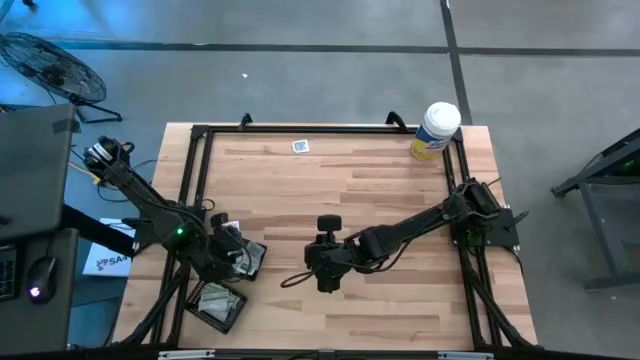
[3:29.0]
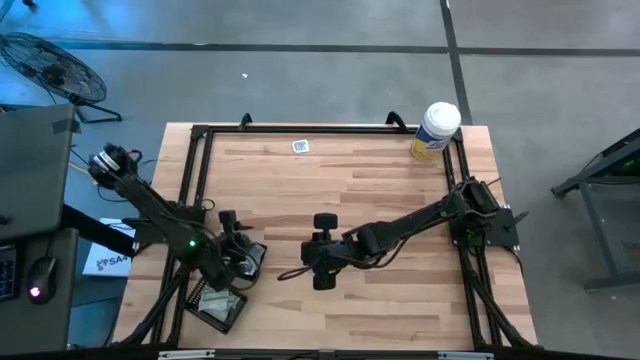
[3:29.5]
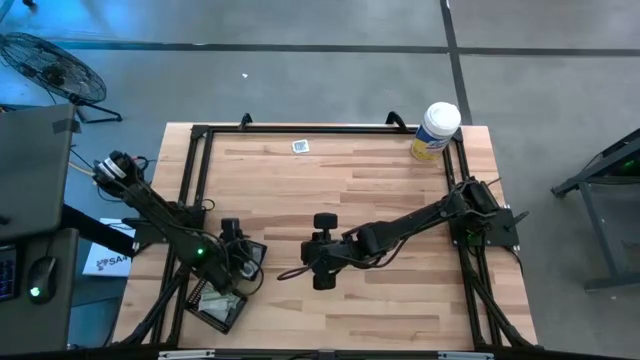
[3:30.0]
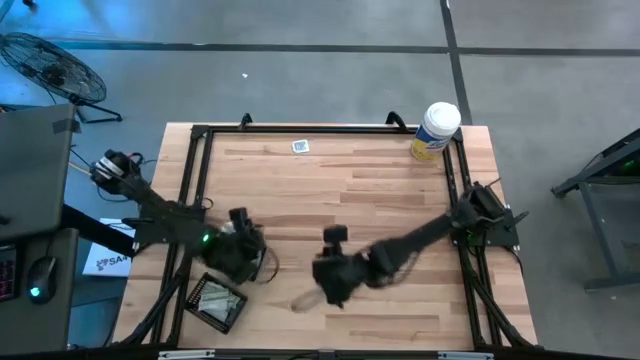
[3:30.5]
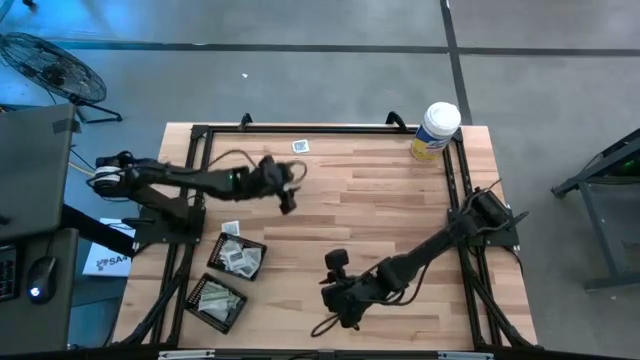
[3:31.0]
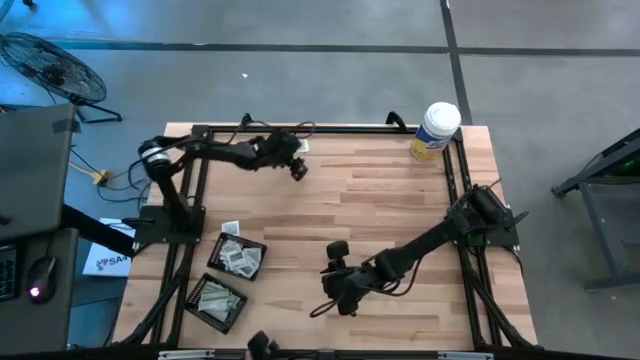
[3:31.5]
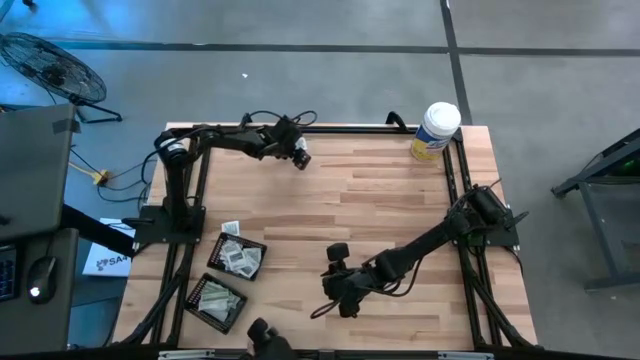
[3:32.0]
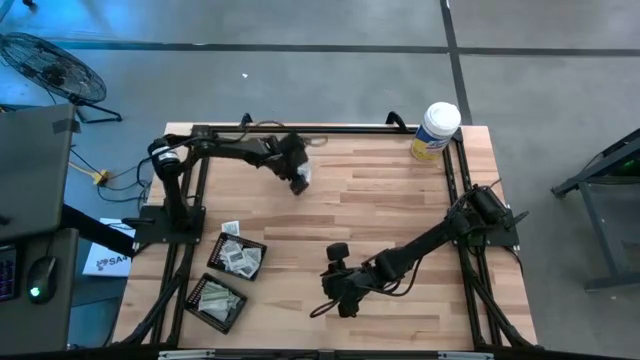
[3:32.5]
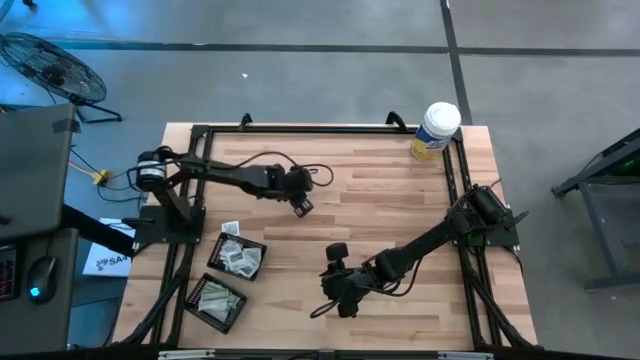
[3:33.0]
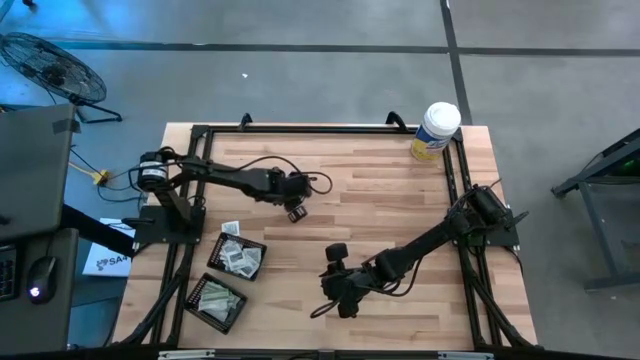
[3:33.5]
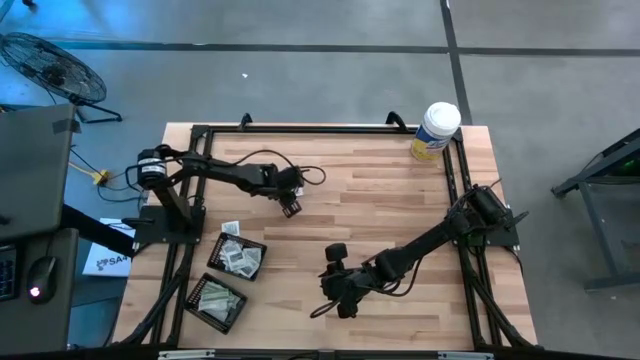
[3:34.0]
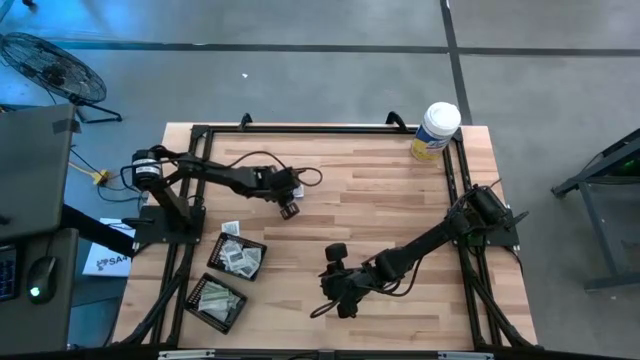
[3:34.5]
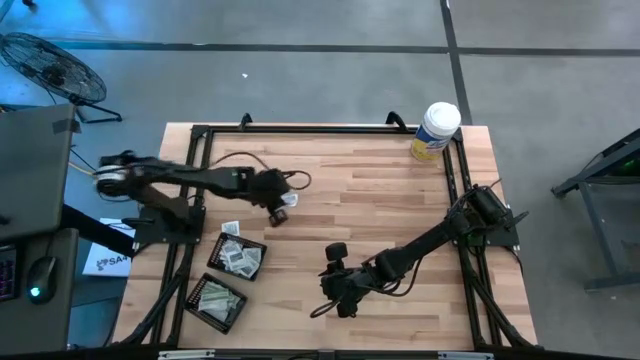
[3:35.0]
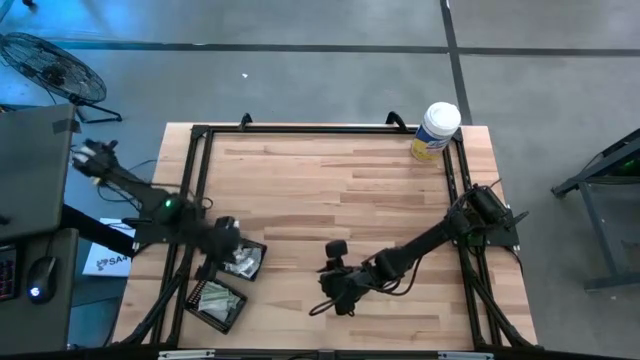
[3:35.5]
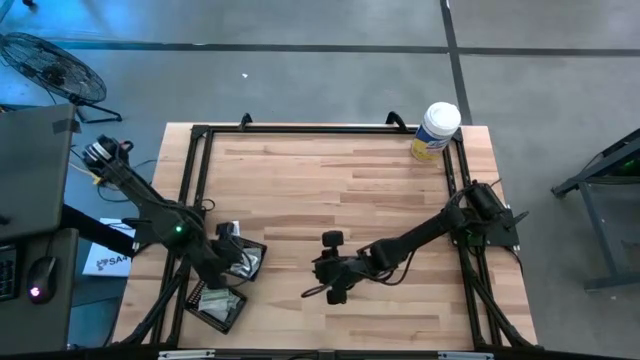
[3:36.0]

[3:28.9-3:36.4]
Task: Pick & Place First Aid Supplies
Put the towelette pack into the top black bin

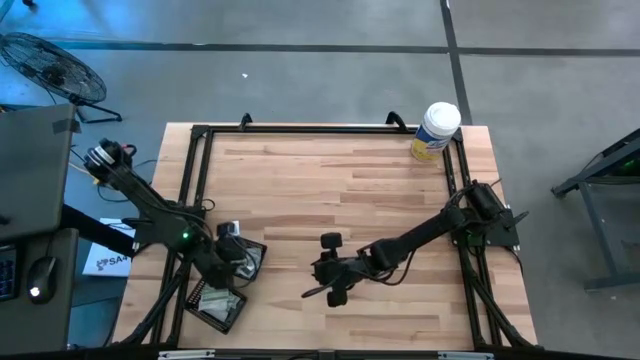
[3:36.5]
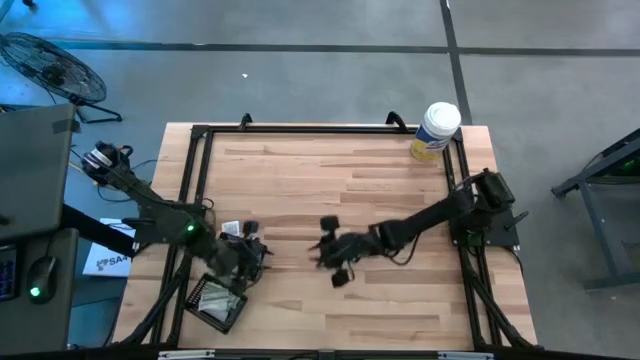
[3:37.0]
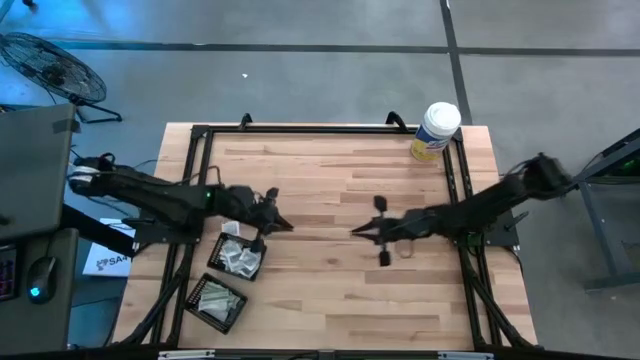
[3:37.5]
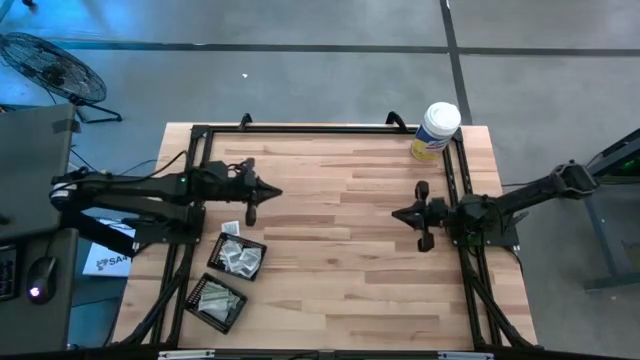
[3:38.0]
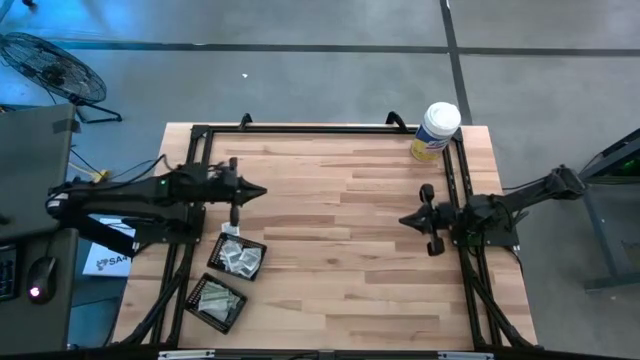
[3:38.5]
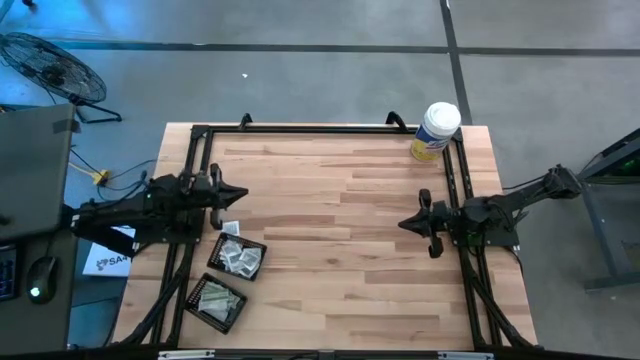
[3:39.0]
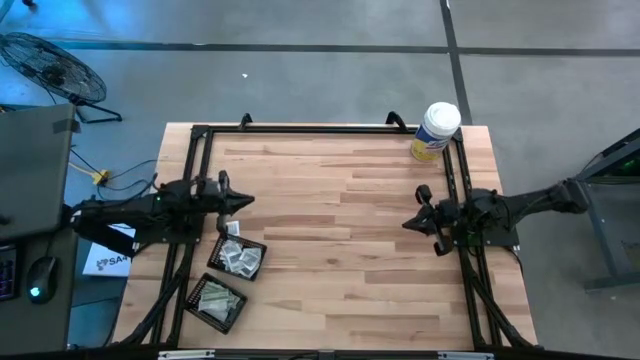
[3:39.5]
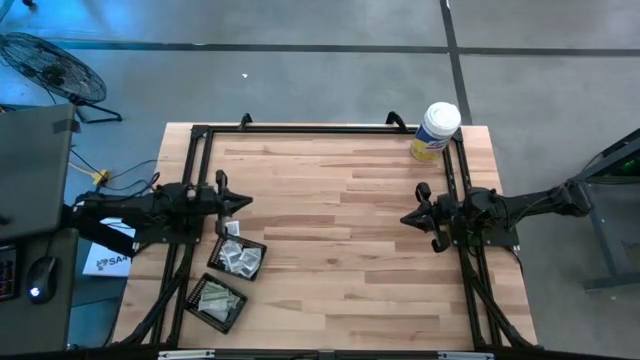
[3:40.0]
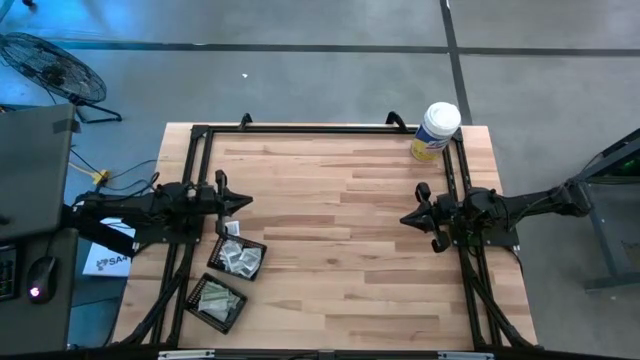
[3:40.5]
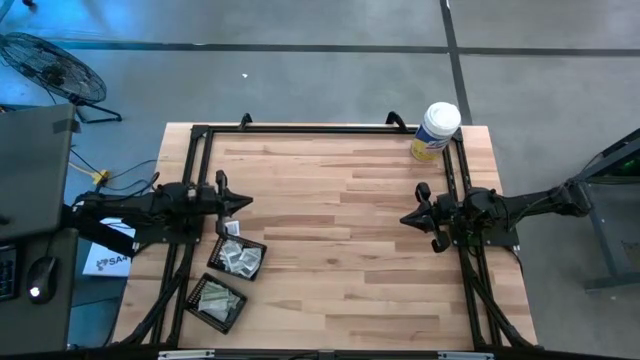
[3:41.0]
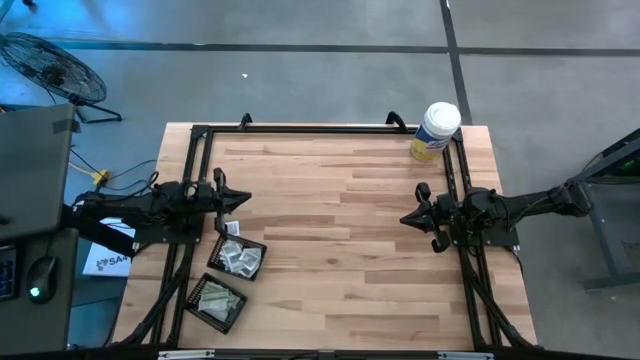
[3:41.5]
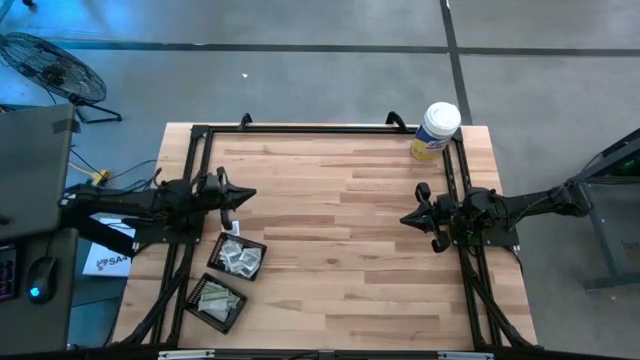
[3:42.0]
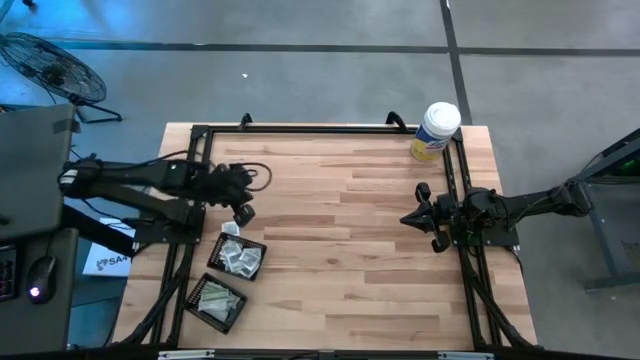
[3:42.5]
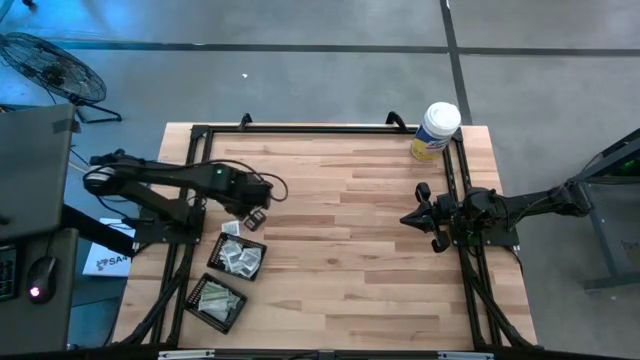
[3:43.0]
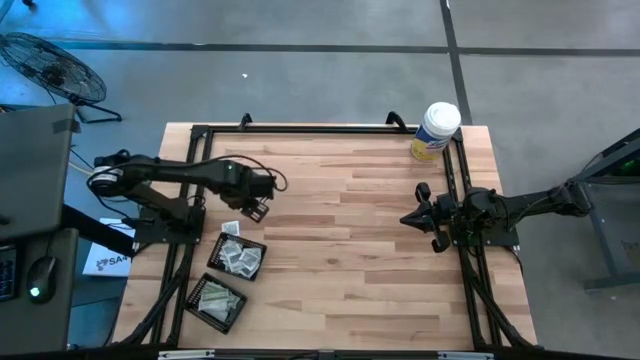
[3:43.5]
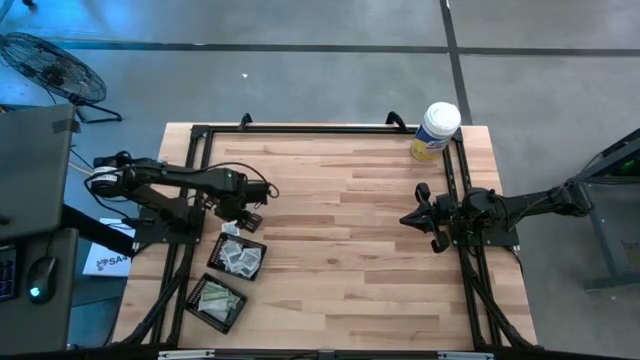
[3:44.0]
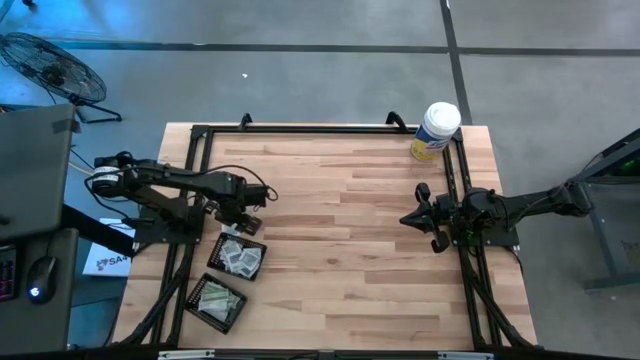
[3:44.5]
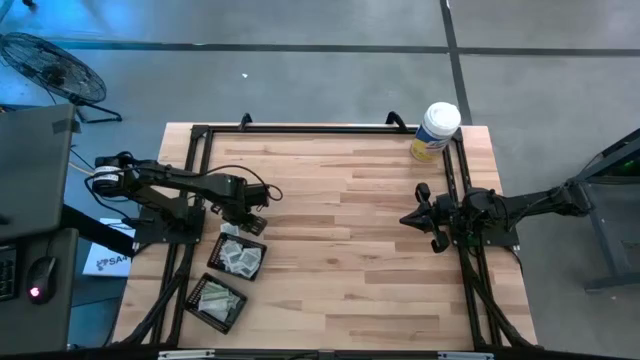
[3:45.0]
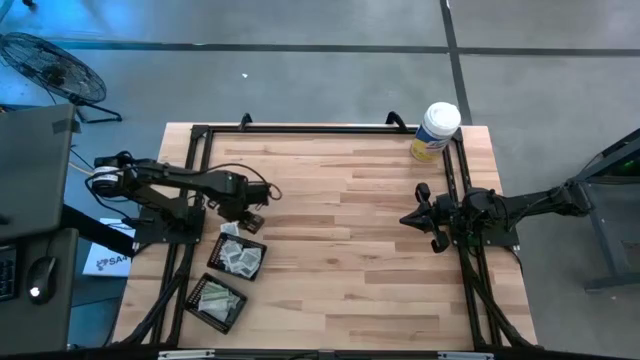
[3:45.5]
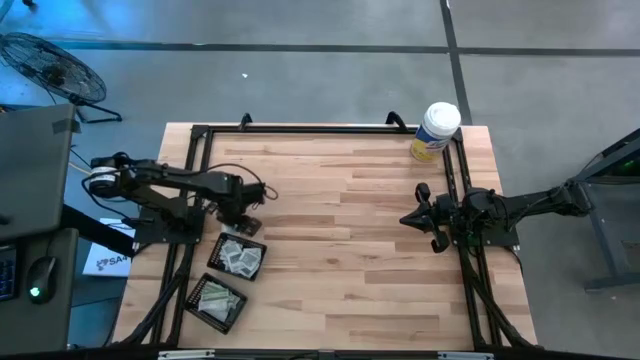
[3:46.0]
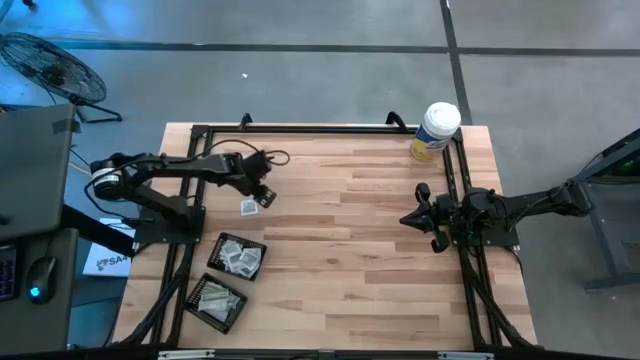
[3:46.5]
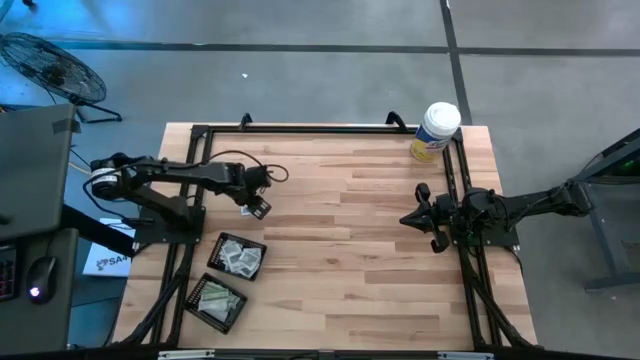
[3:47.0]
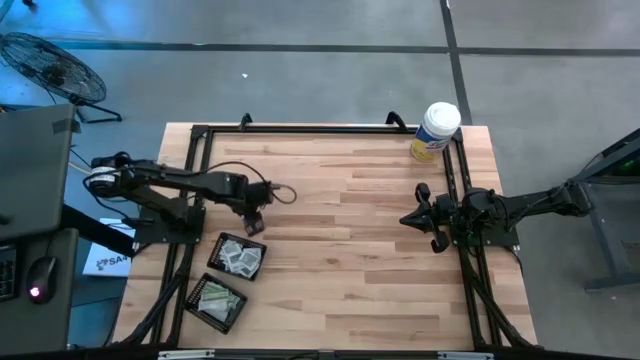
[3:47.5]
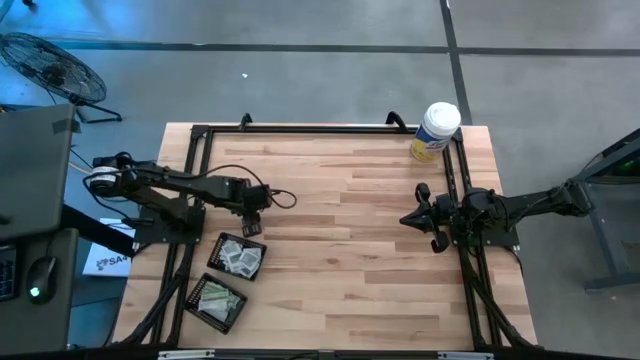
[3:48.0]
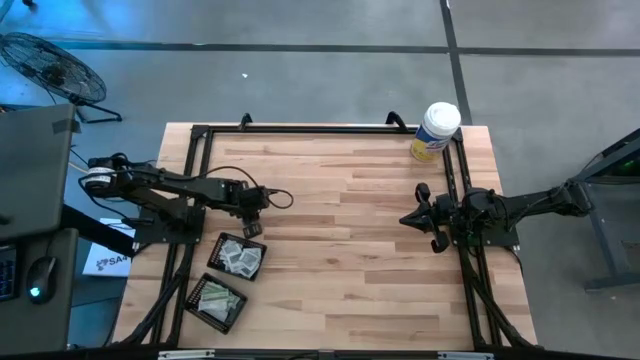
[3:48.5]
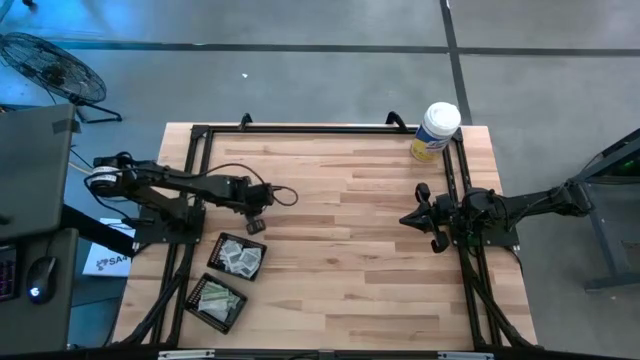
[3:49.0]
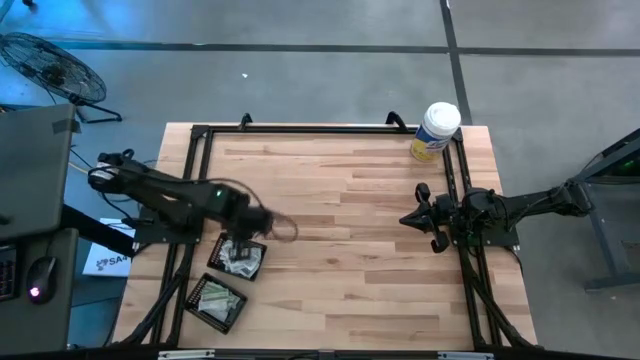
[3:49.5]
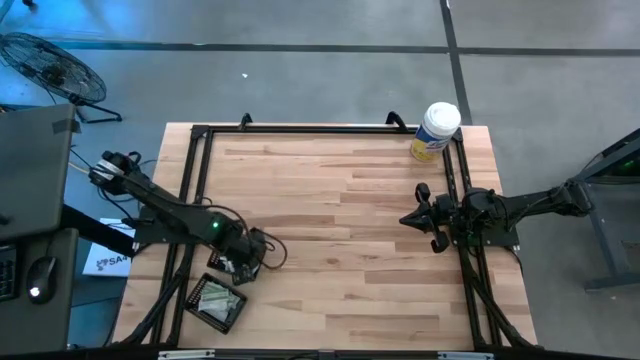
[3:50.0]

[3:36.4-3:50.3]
Put the towelette pack into the top black bin
